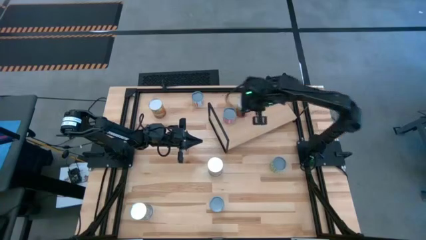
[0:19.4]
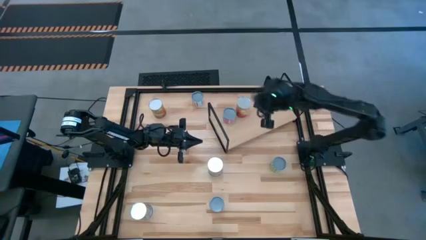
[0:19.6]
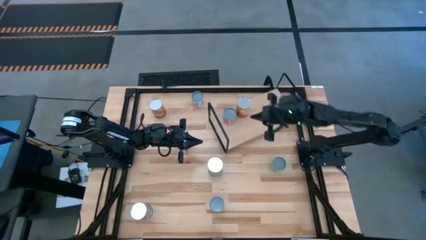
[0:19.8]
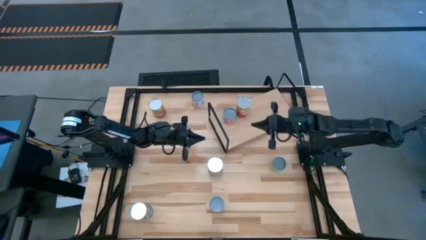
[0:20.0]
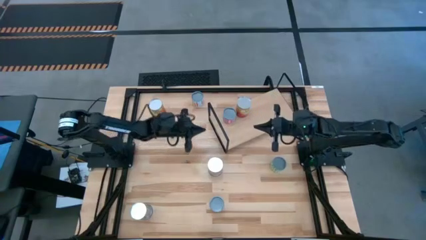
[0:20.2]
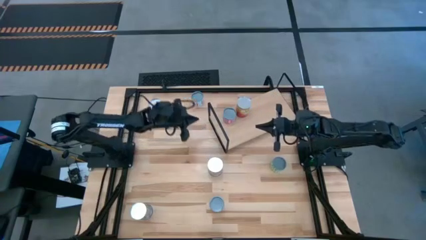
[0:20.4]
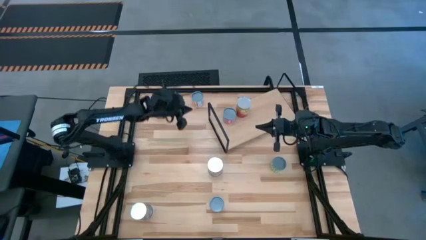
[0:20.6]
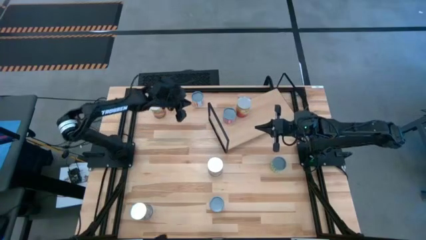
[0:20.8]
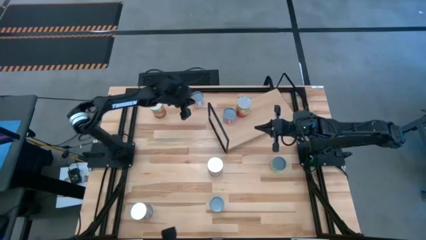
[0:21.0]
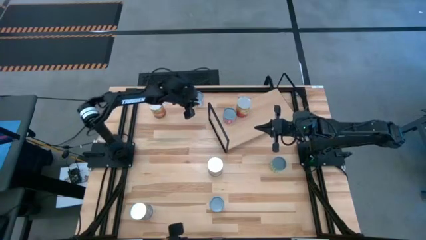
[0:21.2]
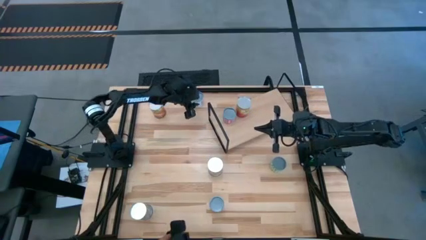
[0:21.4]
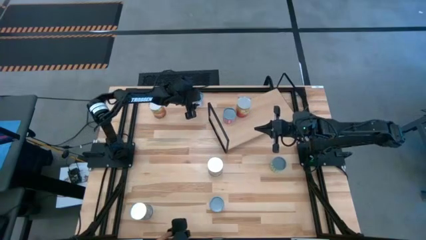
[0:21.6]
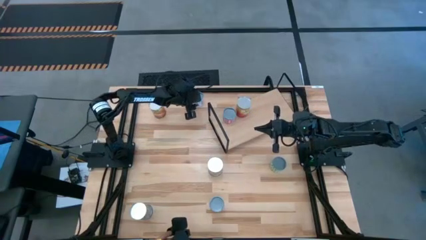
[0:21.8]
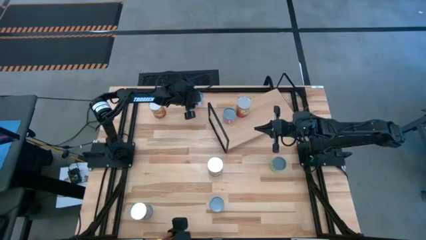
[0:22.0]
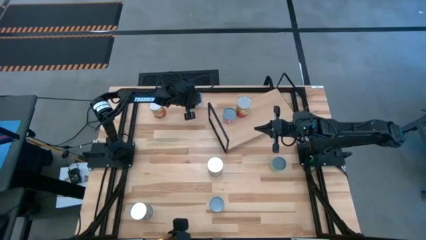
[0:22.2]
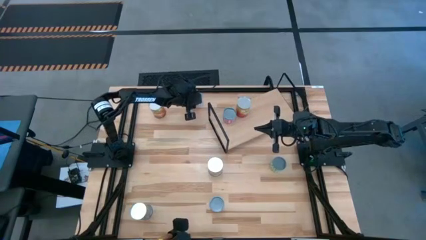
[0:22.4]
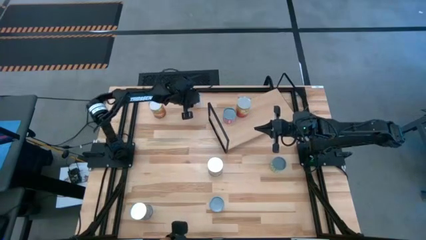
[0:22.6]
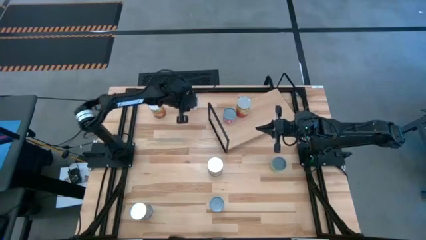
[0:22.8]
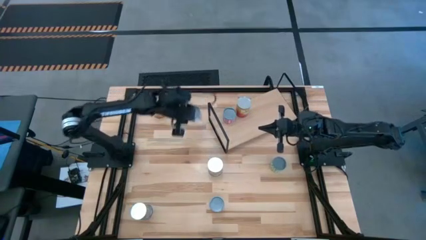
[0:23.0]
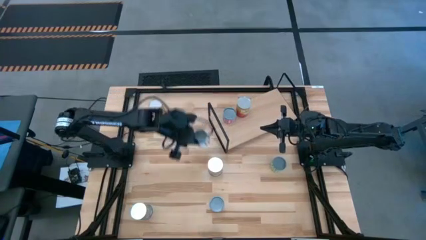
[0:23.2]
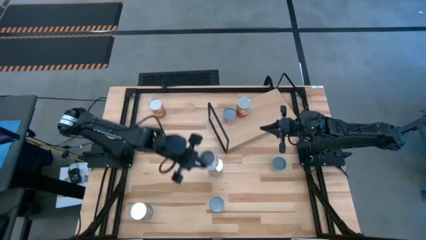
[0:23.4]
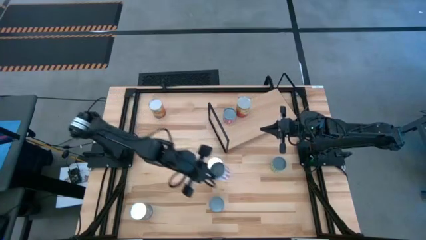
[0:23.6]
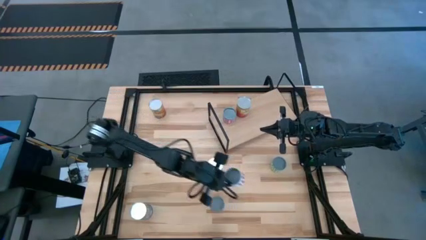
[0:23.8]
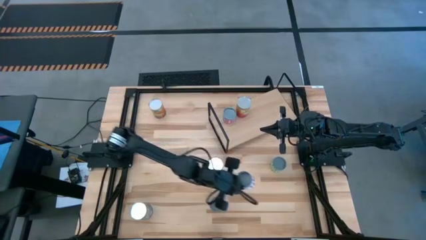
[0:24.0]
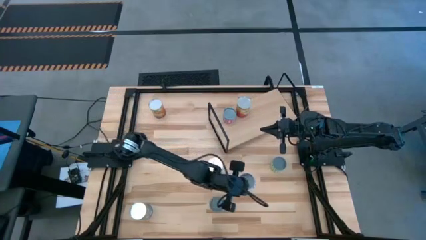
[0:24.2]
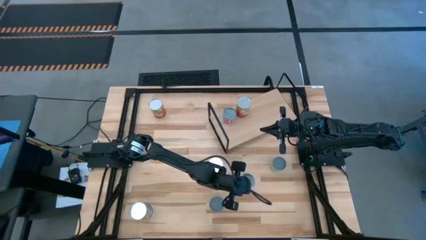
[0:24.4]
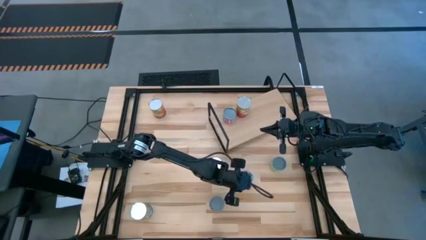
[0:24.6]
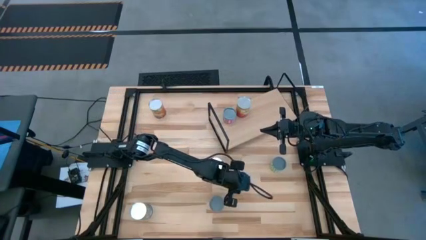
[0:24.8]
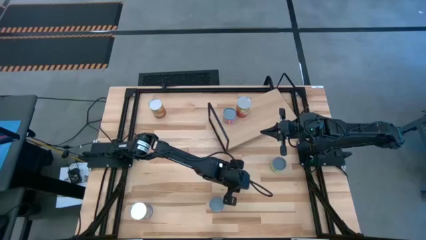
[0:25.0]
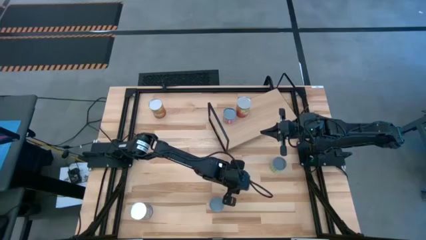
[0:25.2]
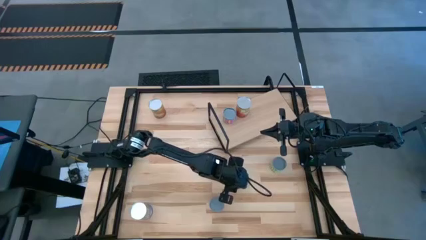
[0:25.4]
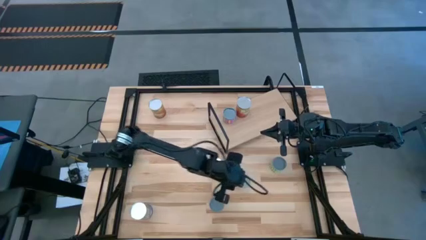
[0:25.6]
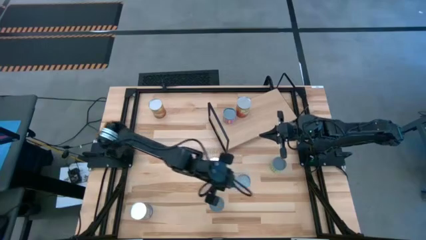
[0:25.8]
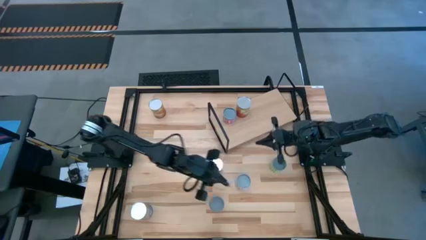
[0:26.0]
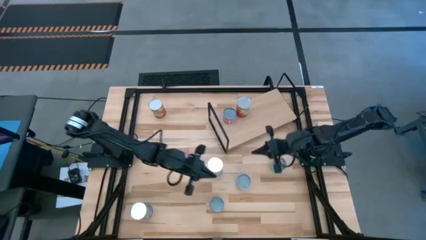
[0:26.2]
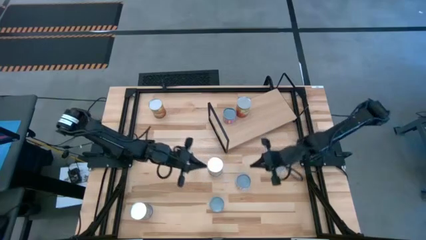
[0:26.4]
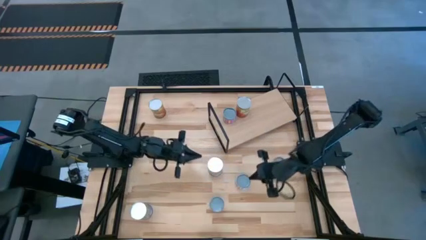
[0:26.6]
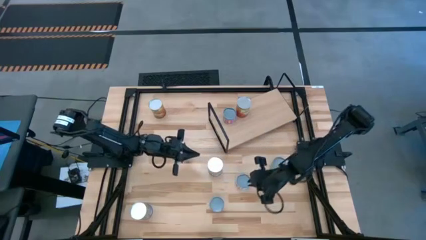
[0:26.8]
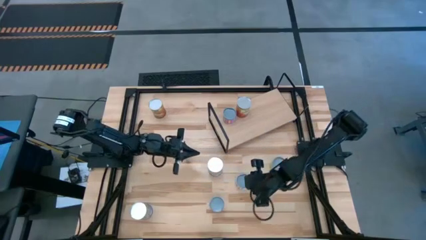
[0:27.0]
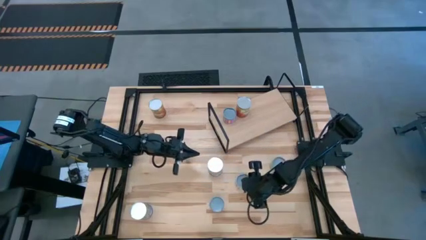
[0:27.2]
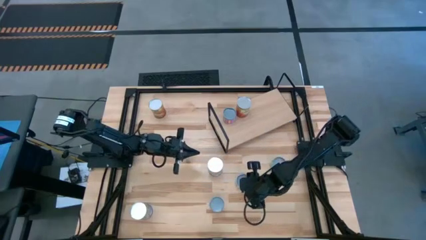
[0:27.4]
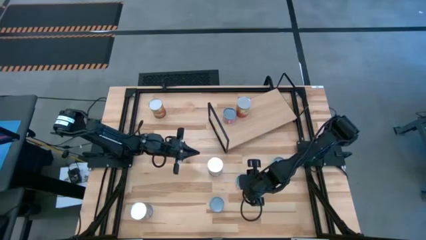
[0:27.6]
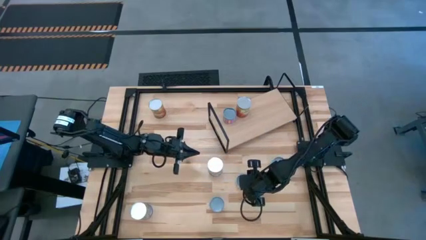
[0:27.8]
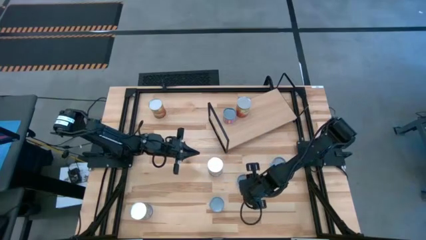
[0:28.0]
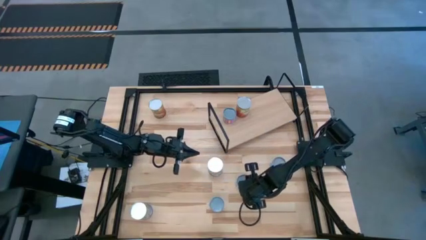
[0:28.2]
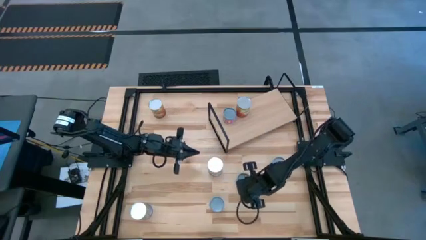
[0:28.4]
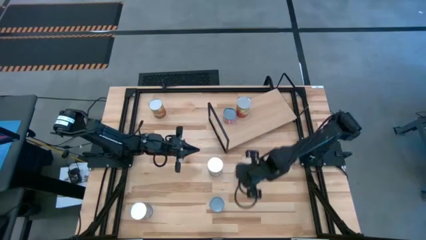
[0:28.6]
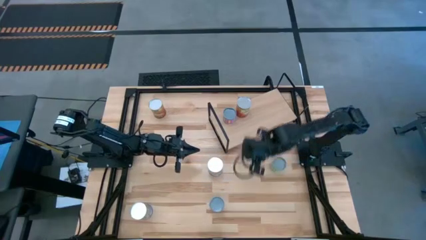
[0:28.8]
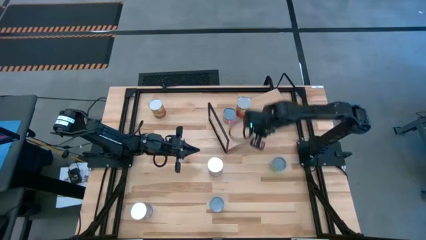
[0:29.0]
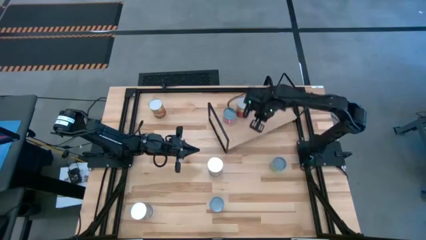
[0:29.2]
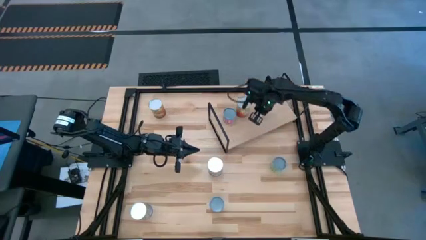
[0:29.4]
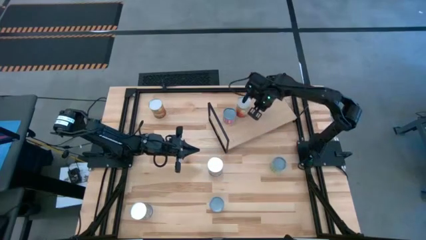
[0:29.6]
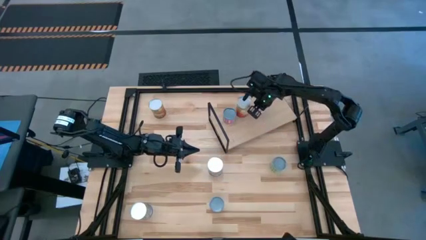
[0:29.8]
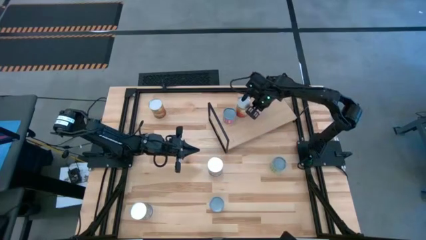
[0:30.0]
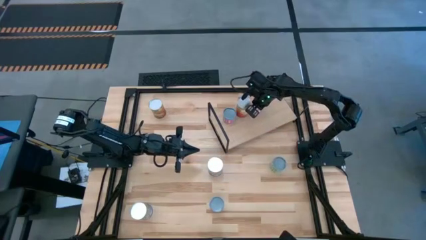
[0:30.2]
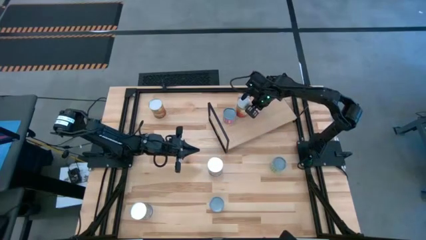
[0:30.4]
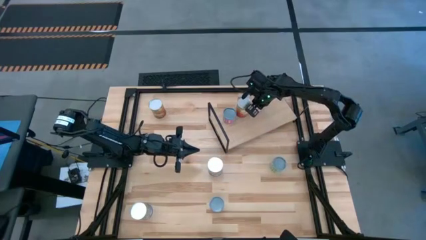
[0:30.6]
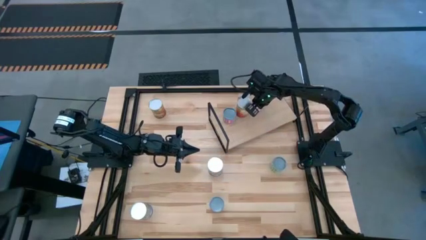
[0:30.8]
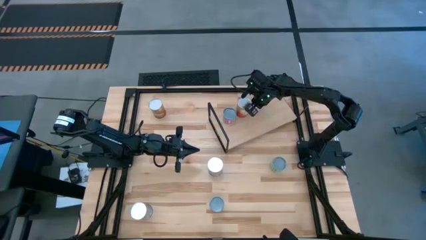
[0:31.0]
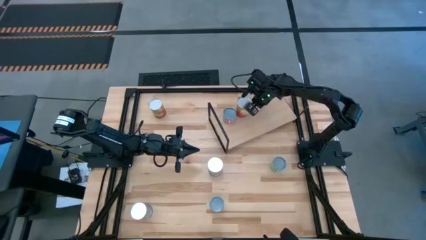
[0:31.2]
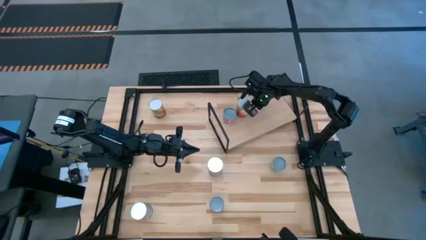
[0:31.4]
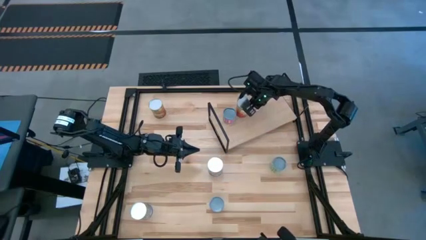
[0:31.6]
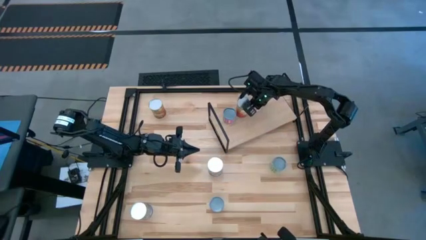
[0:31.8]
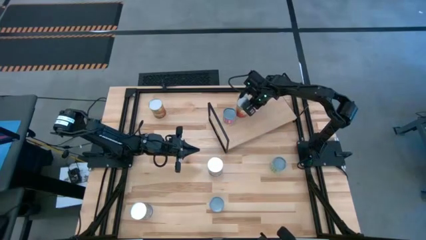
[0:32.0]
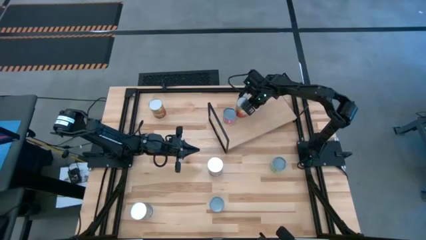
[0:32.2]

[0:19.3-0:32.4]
Task: Pick and place cans onto a shelf
Put the canned sliced carrots on the shelf

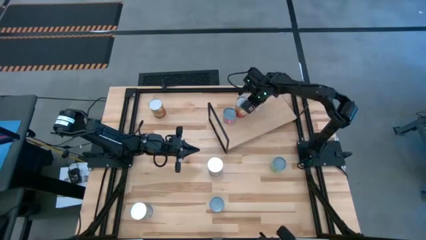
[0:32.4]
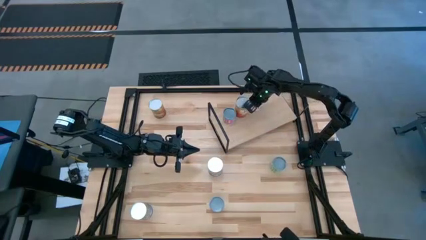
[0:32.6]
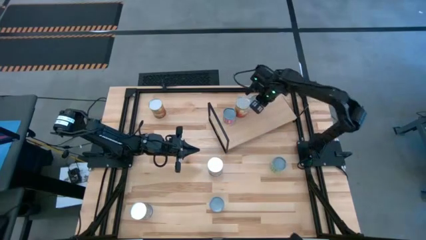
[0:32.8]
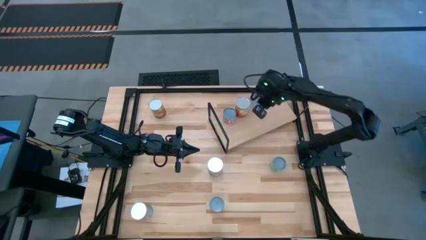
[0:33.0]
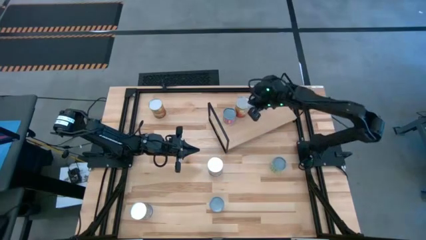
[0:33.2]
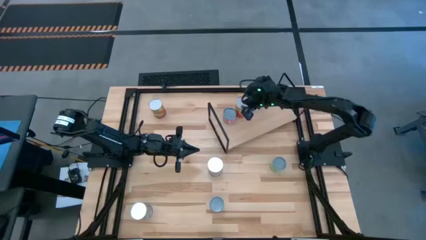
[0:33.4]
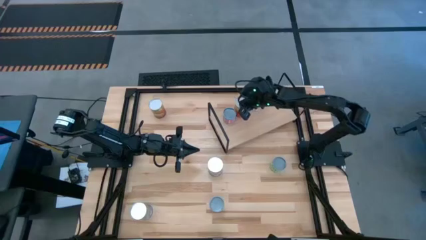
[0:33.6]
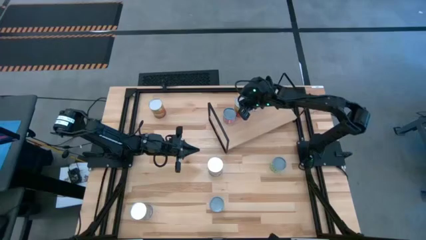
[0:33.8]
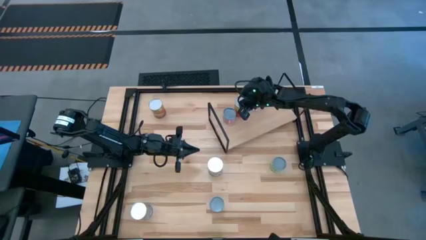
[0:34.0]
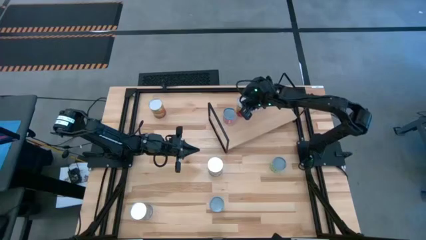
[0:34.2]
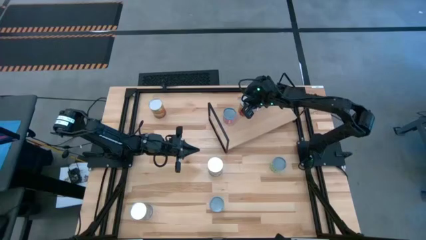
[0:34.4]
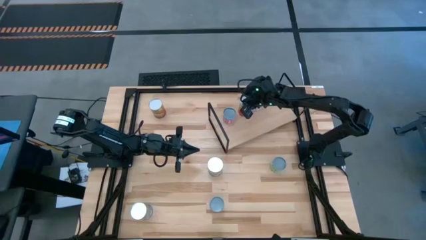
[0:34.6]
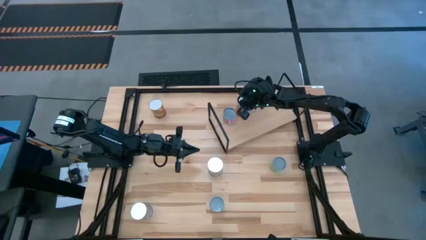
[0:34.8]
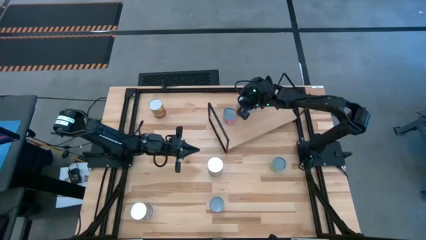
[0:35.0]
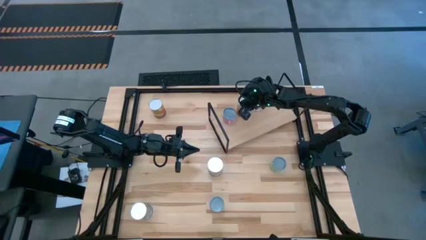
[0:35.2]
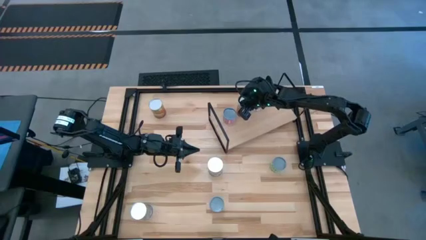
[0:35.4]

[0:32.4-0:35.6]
Adjust the canned corn on the shelf

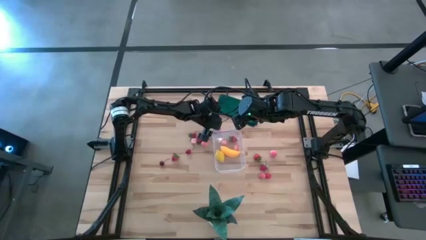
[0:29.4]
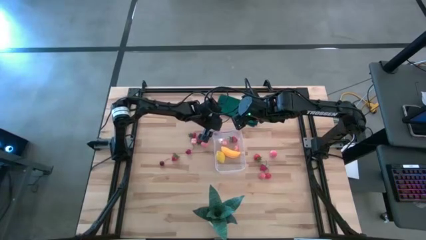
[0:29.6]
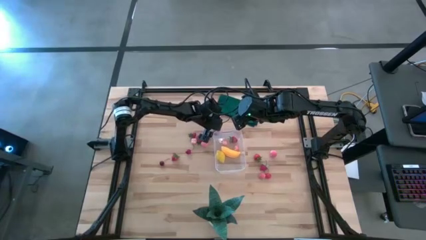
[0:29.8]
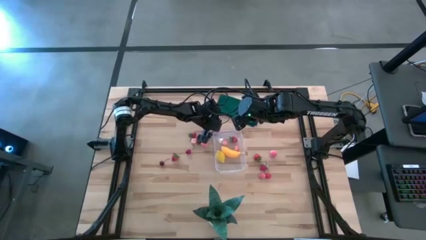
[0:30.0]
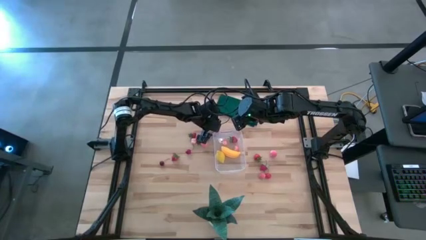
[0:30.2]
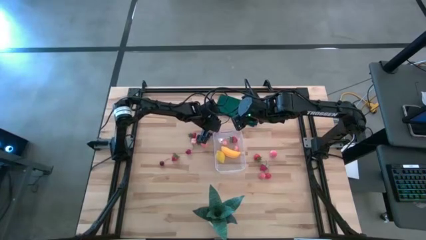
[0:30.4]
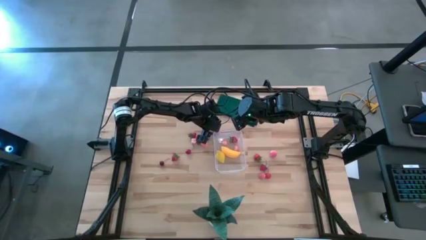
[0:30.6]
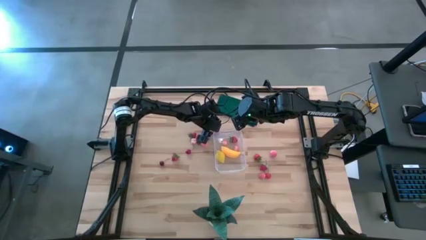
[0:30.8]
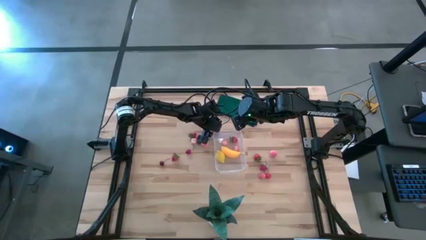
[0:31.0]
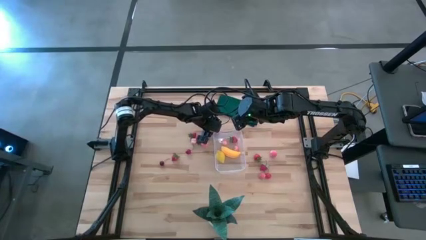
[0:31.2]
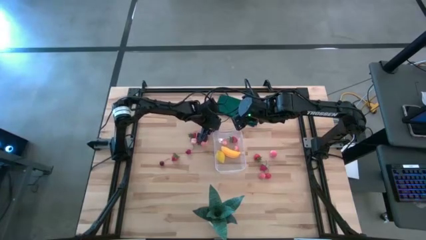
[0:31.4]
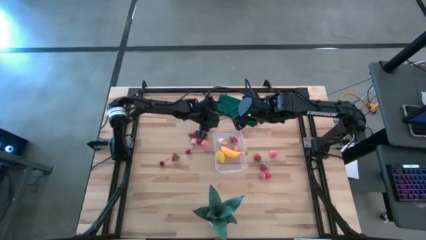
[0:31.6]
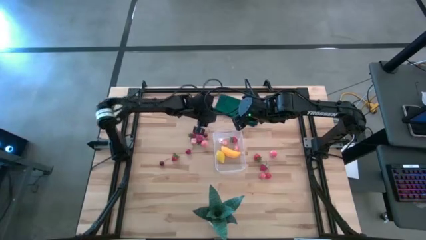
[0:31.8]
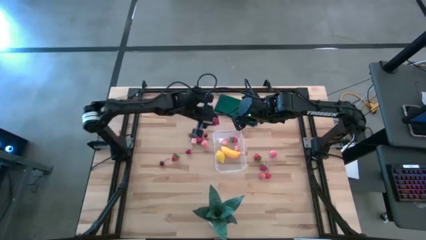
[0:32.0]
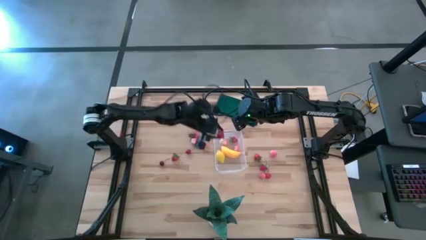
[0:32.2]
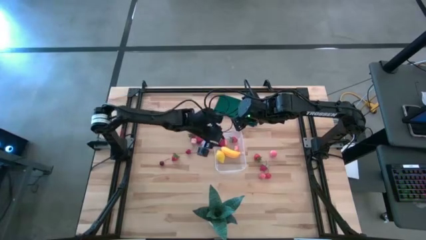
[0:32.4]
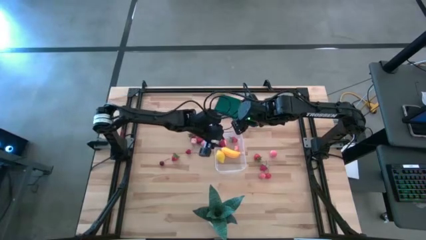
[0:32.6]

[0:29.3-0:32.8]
Task: Pick and placing Produce into tupperware
Put the strawberry into the transparent bin
